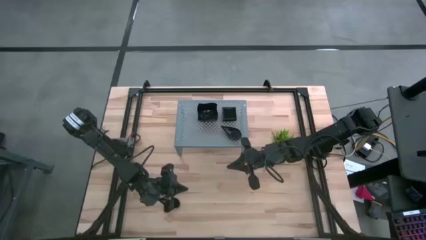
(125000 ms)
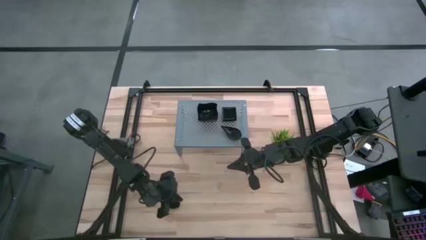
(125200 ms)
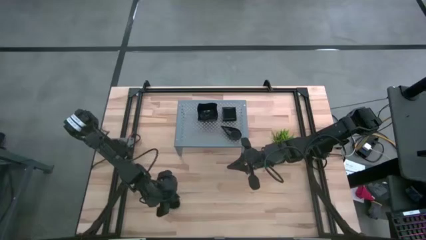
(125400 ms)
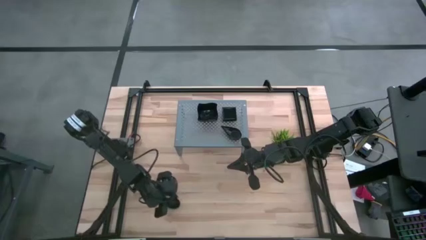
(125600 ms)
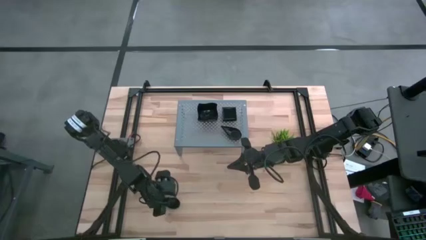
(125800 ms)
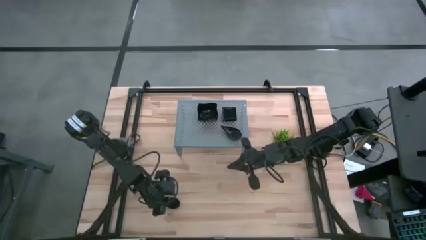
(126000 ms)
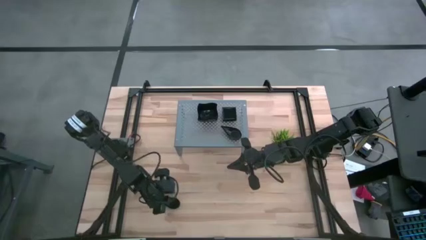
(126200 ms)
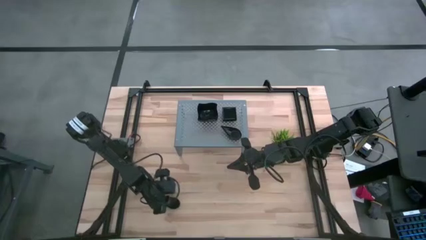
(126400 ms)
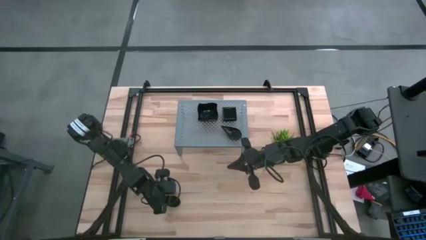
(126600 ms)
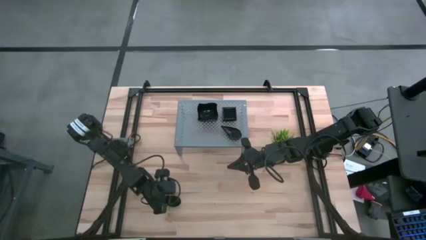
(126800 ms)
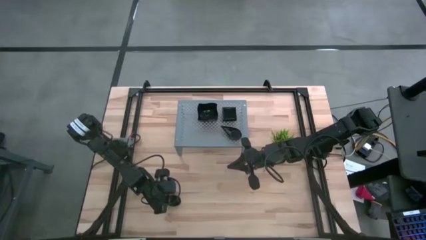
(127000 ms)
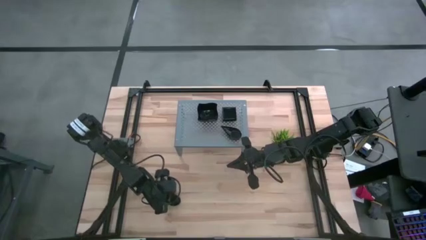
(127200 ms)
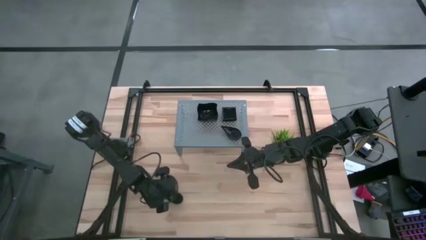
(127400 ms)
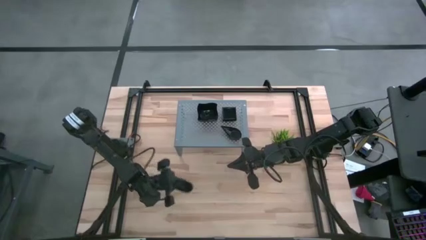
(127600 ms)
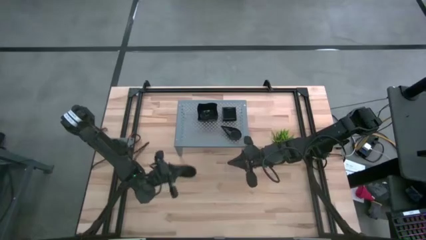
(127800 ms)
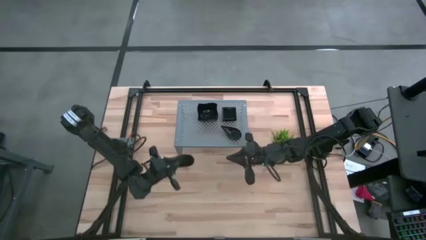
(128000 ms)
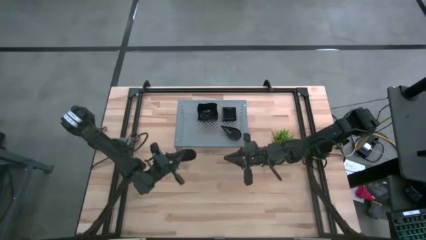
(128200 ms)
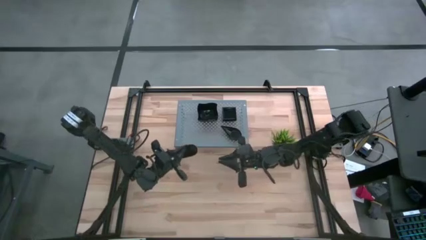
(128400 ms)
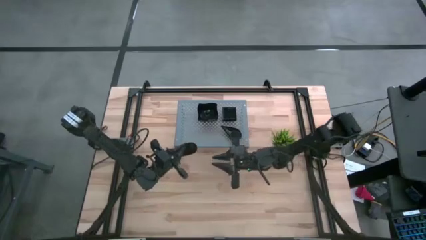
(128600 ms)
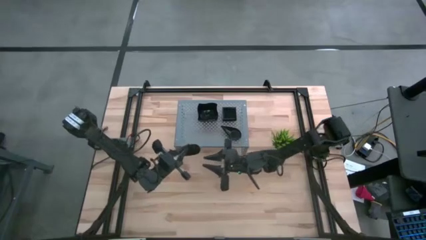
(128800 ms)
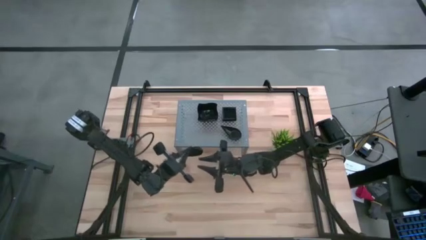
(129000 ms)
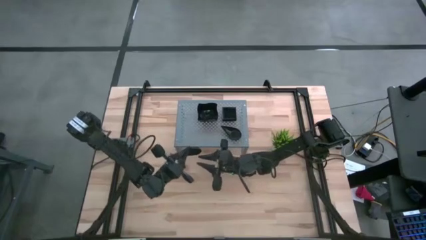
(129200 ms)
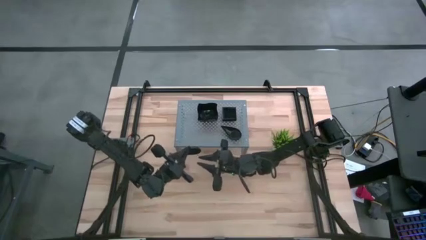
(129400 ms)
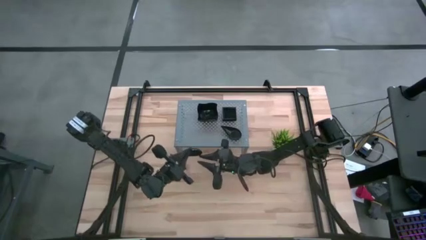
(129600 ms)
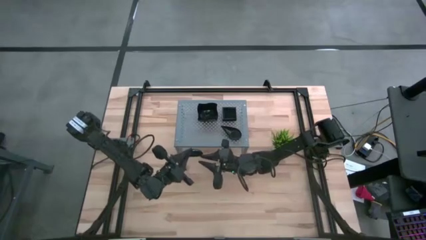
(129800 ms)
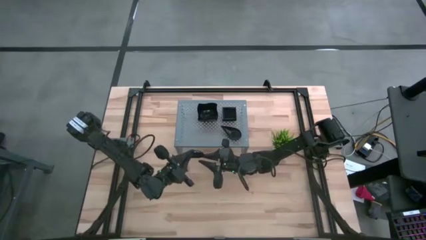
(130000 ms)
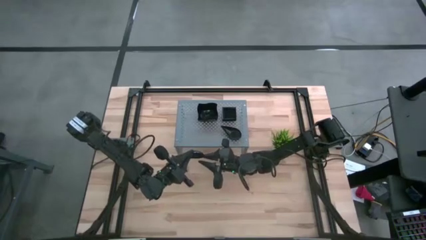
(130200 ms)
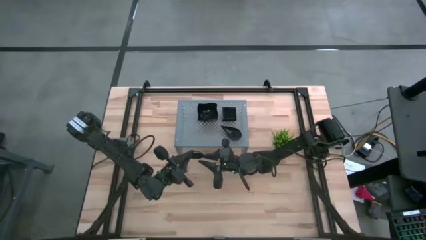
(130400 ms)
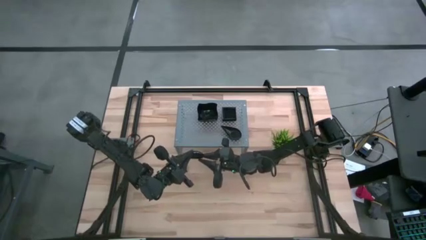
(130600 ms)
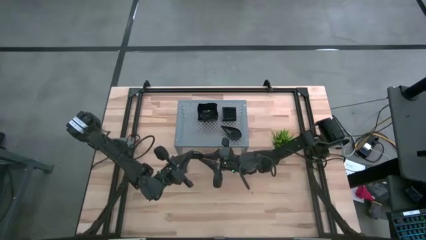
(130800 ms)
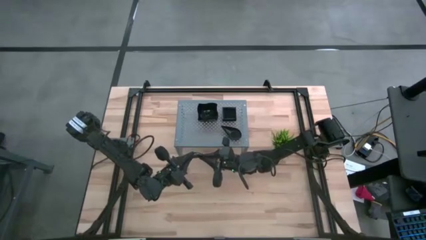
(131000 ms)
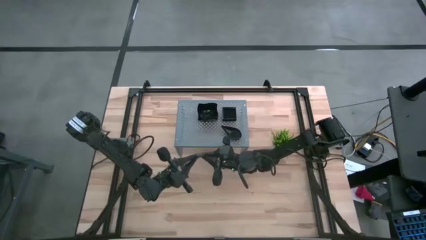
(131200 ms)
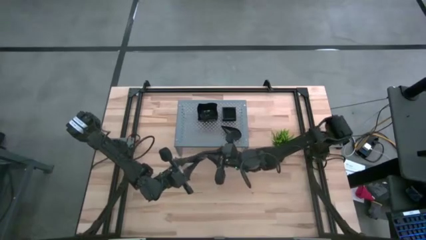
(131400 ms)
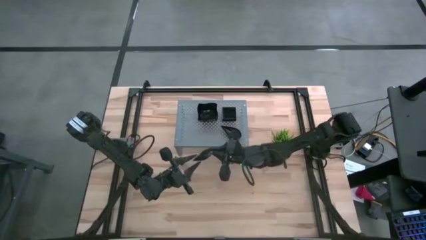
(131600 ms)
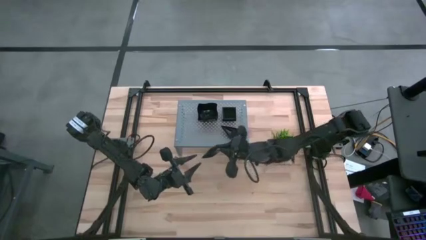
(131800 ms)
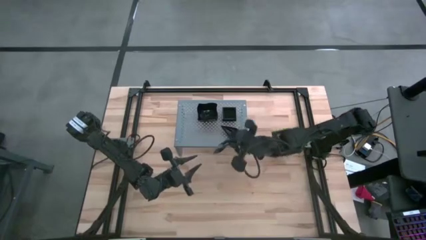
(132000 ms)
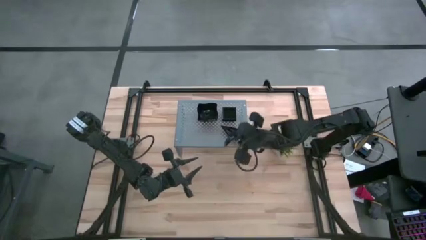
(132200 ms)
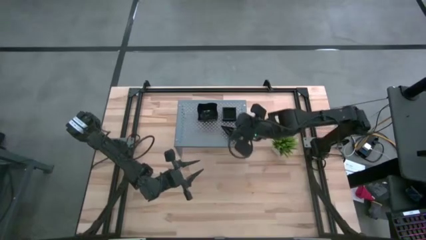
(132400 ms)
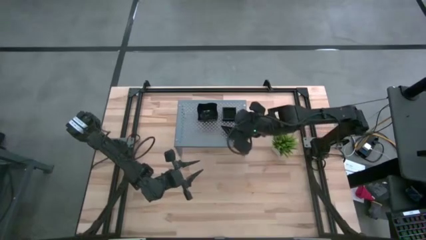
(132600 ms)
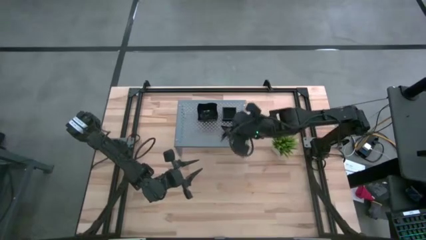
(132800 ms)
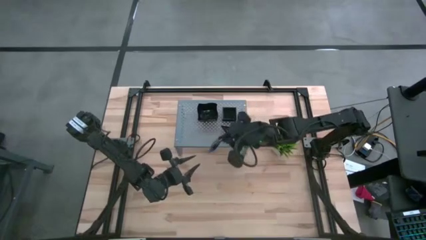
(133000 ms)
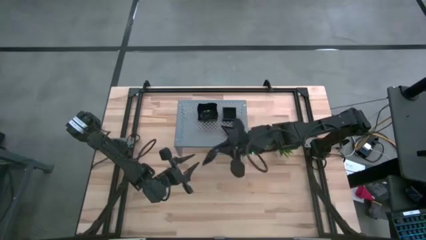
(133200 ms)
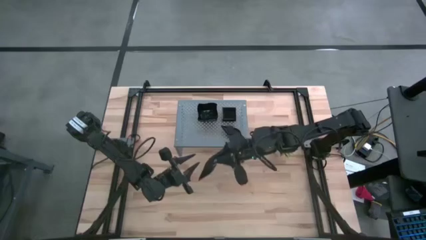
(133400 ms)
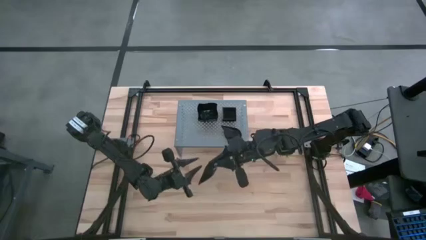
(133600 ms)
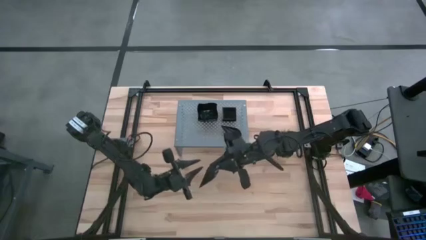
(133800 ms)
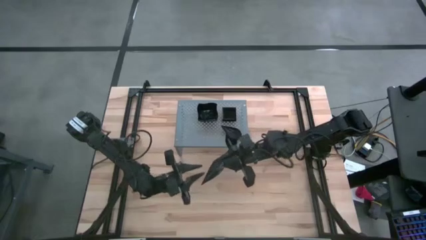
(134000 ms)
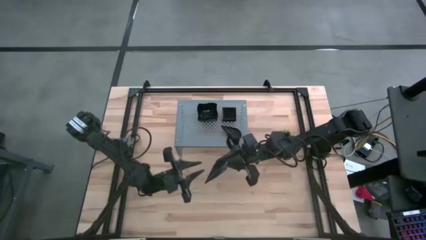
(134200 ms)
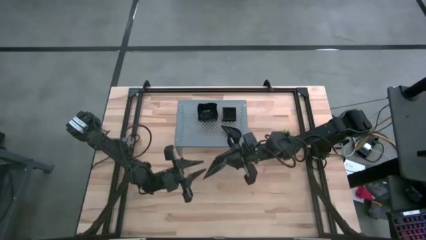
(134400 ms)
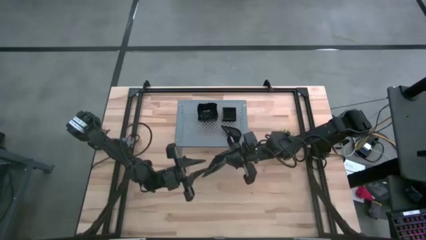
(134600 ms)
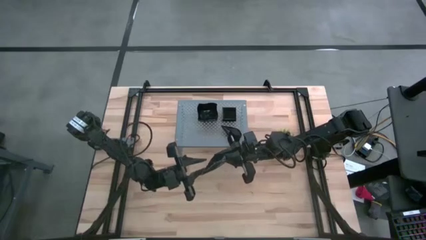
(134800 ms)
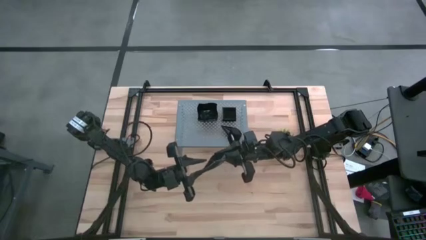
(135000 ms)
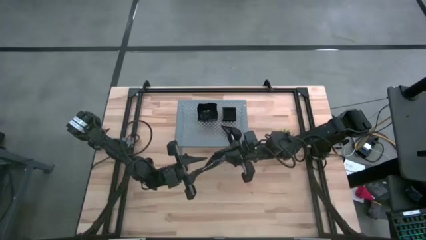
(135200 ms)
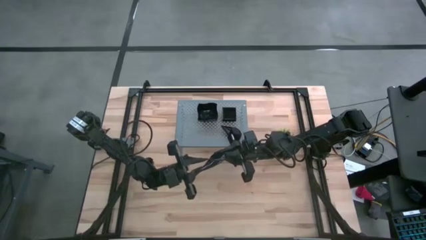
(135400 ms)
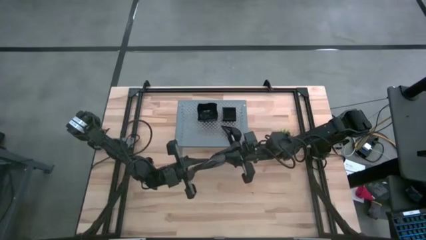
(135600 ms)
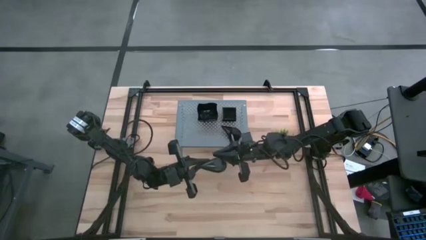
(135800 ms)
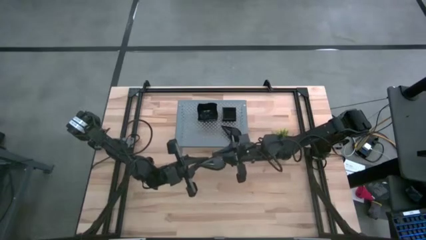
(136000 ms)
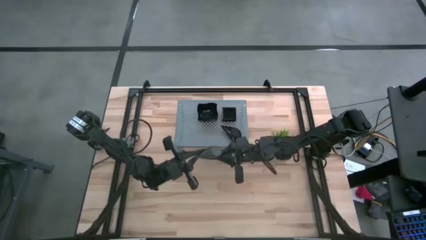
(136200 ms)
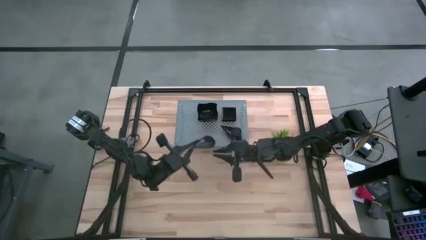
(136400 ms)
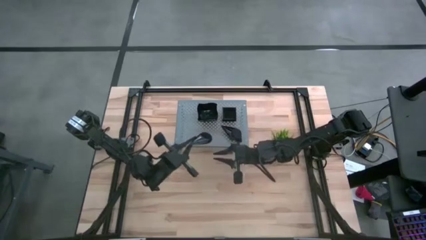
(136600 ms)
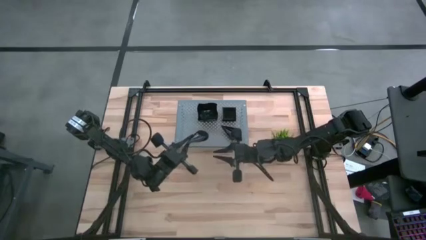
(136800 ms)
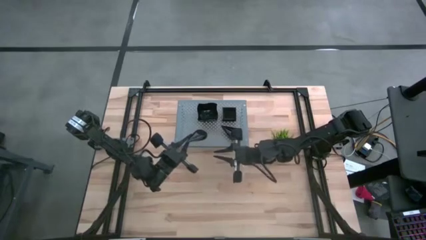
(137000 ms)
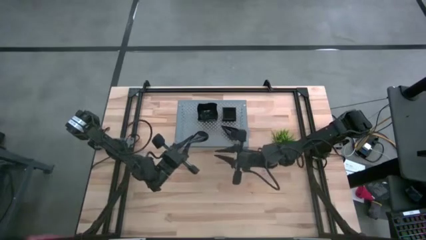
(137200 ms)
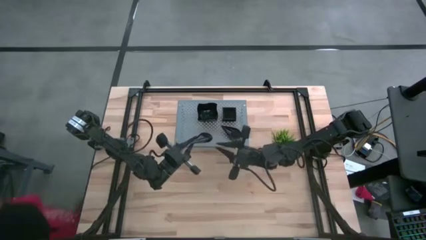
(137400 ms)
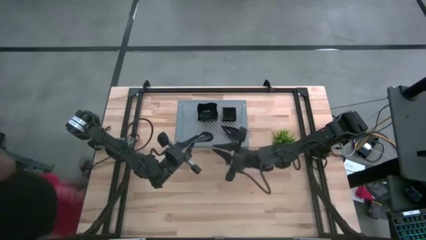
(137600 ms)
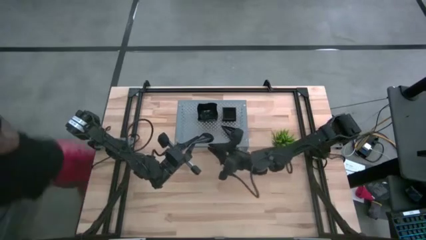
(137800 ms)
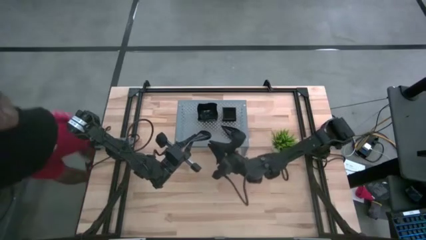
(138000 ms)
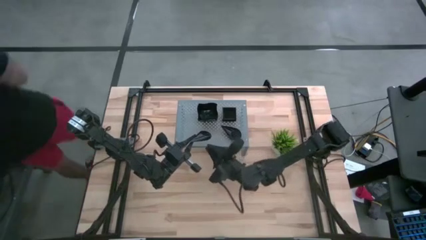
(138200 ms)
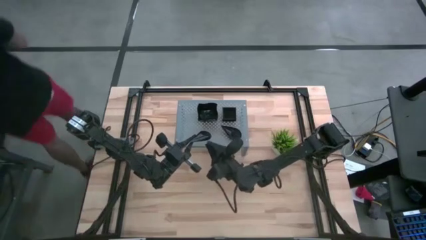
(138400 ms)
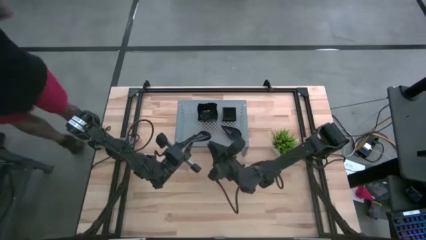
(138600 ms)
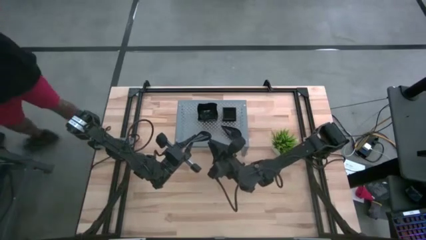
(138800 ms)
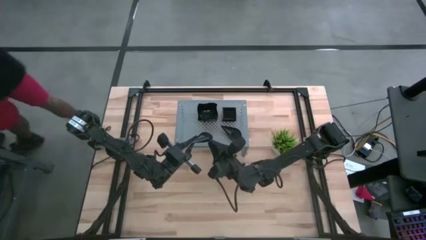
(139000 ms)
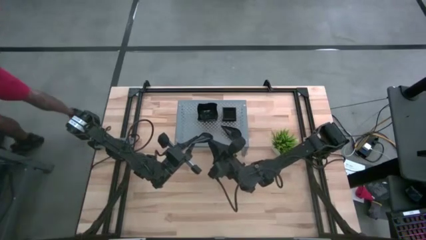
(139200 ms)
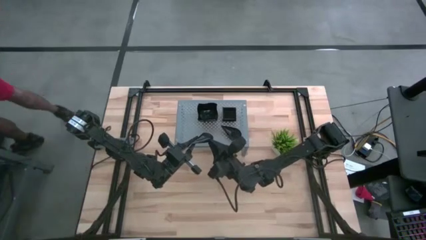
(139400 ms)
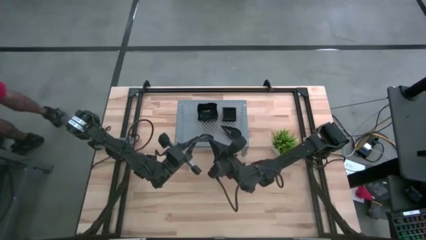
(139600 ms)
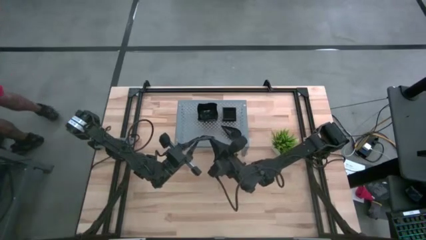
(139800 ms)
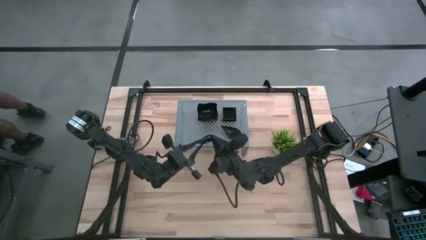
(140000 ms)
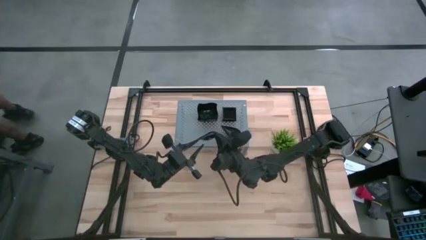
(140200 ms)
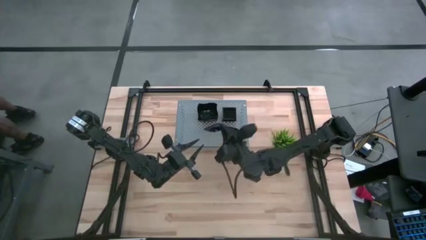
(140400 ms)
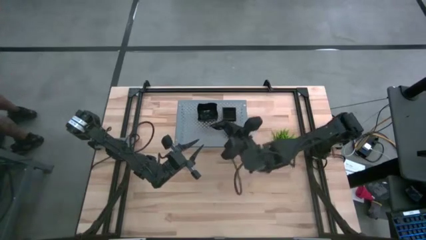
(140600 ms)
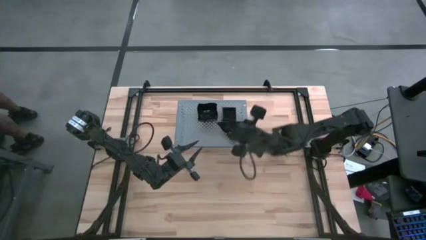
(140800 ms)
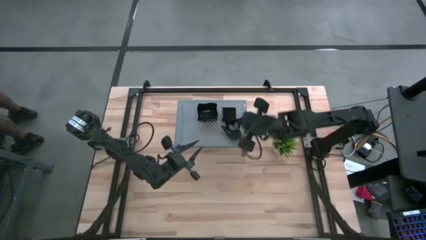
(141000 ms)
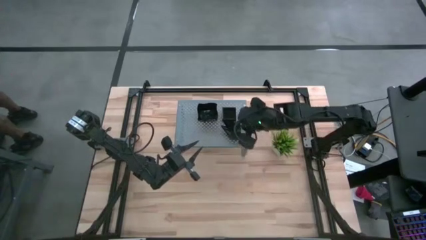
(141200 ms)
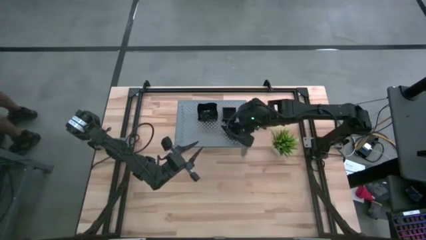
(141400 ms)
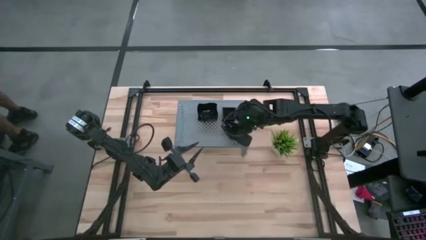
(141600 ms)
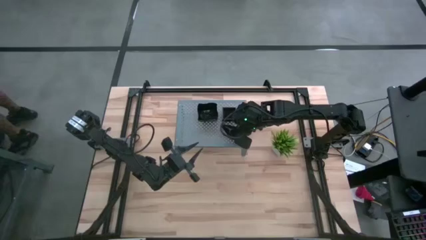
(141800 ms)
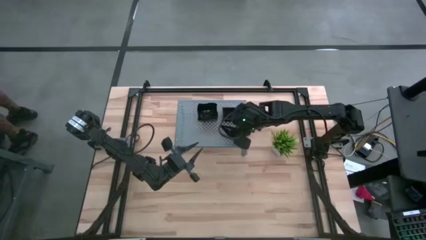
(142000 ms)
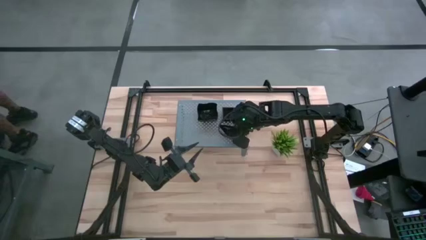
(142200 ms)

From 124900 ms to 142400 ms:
Task: Pick & Place Mini shaped plates
Stack the drop-shaped plate on top of the drop-shaped plate on the shelf
